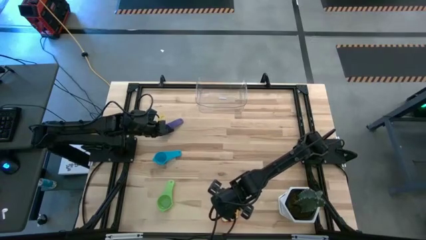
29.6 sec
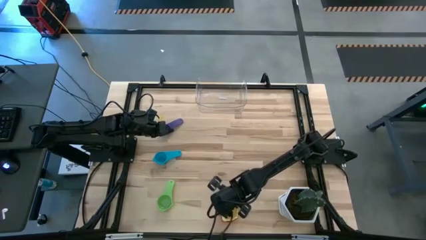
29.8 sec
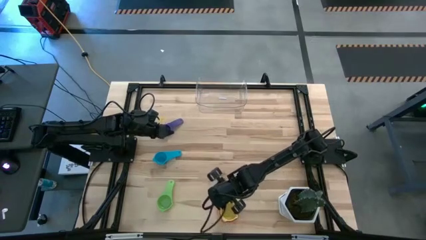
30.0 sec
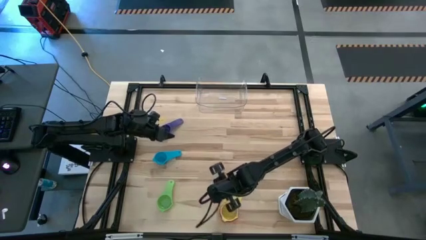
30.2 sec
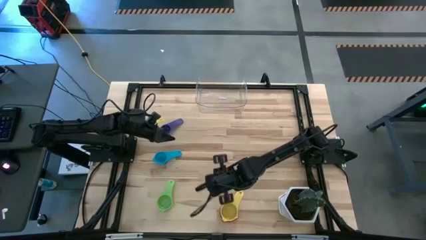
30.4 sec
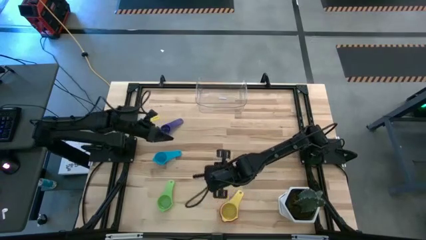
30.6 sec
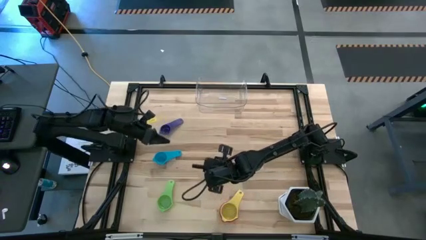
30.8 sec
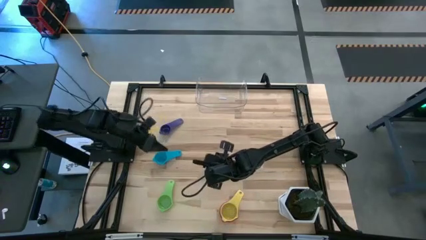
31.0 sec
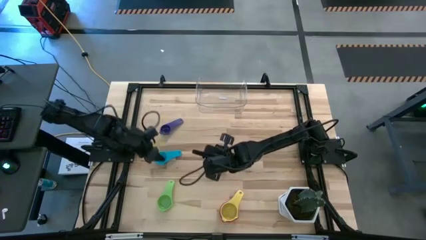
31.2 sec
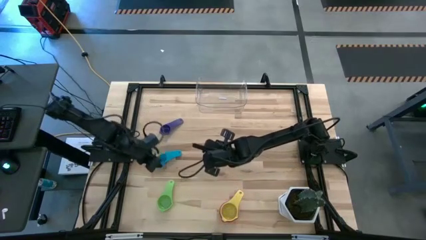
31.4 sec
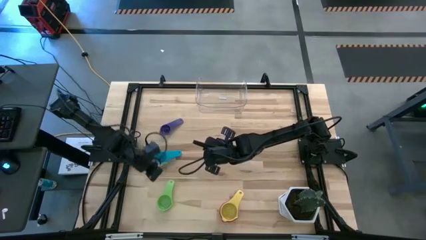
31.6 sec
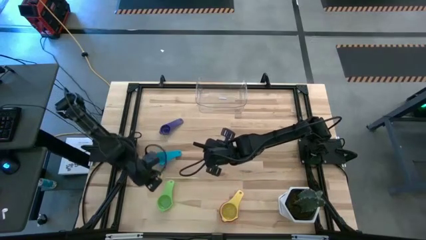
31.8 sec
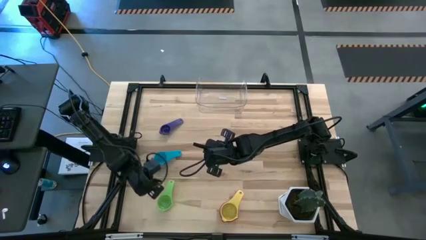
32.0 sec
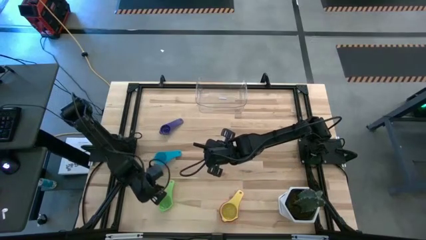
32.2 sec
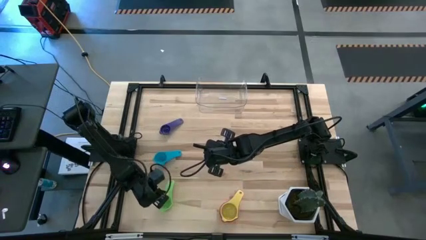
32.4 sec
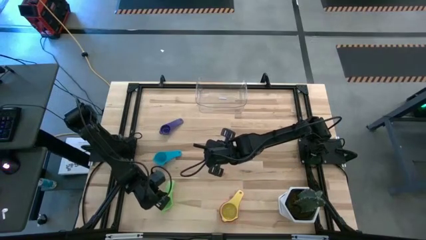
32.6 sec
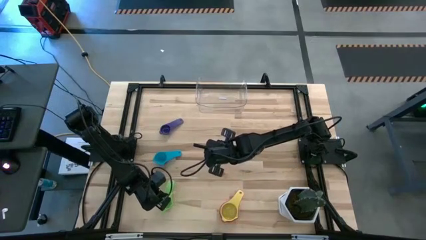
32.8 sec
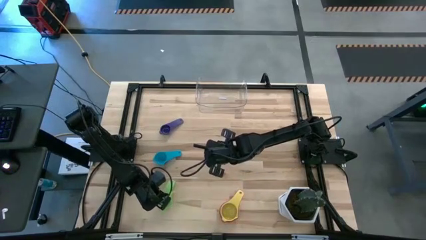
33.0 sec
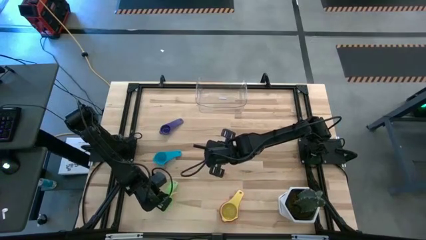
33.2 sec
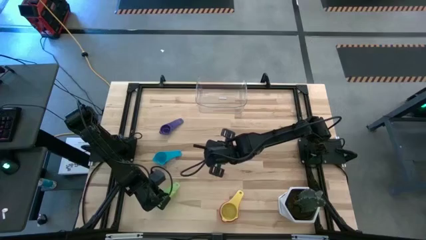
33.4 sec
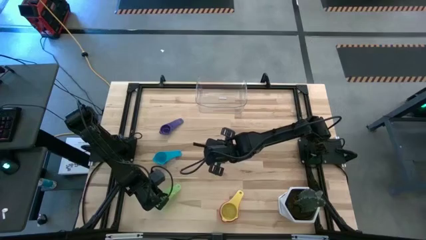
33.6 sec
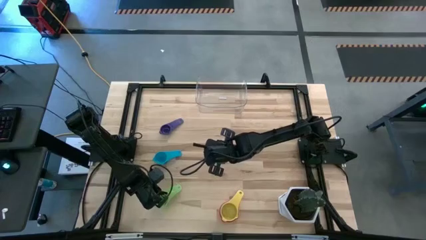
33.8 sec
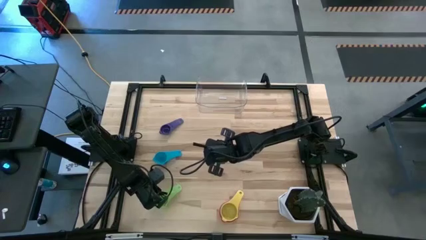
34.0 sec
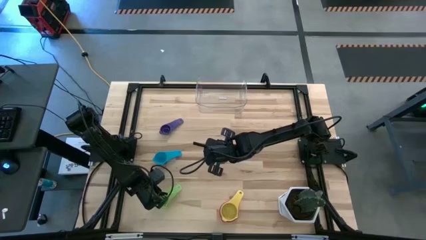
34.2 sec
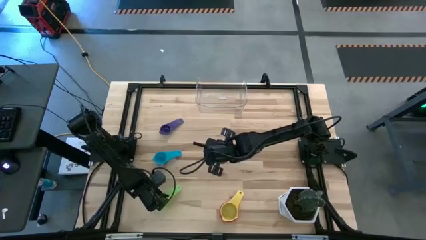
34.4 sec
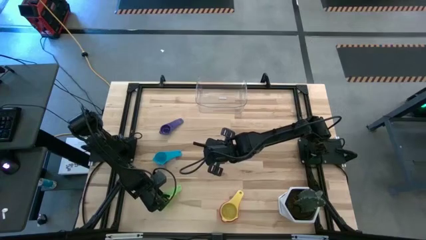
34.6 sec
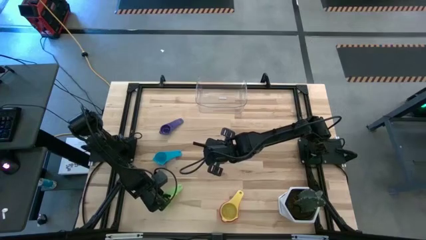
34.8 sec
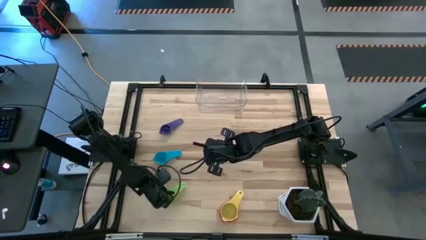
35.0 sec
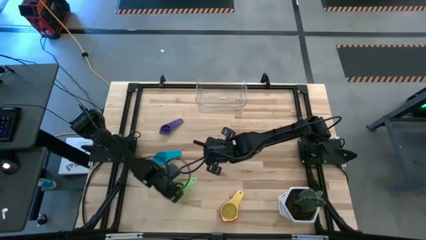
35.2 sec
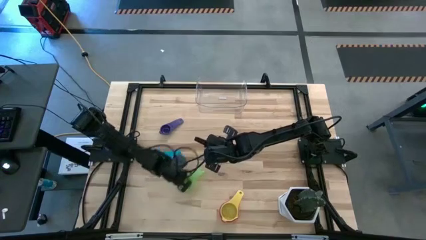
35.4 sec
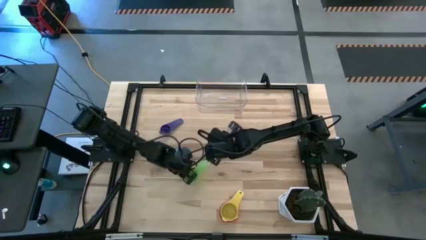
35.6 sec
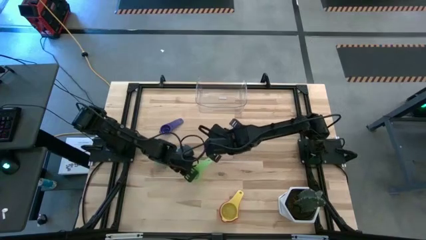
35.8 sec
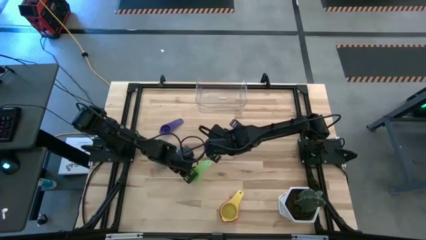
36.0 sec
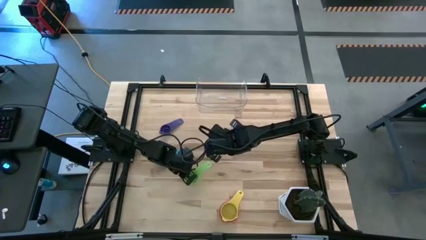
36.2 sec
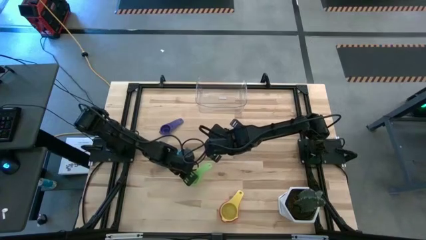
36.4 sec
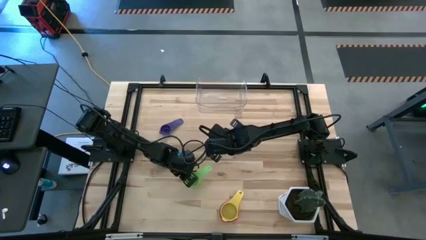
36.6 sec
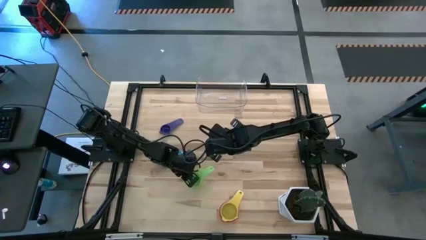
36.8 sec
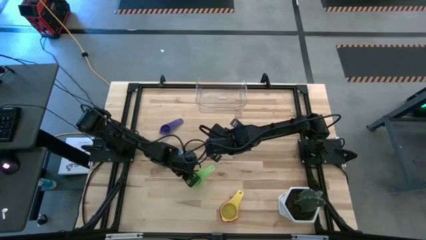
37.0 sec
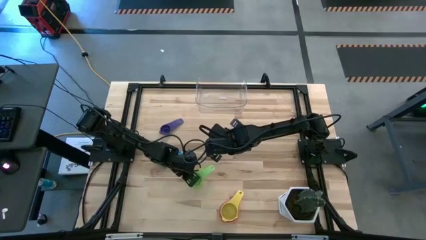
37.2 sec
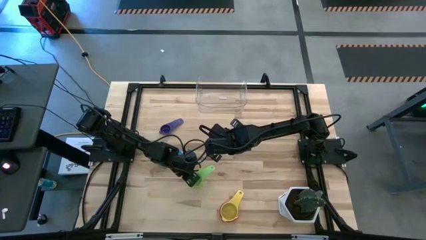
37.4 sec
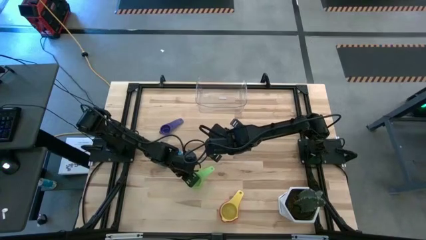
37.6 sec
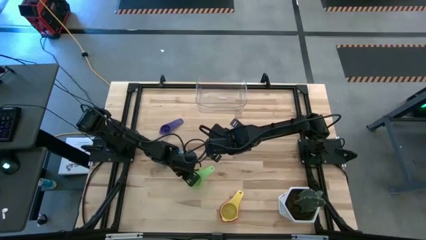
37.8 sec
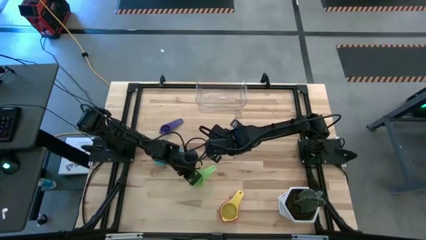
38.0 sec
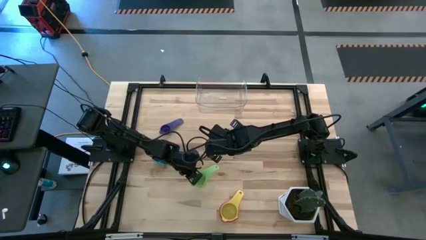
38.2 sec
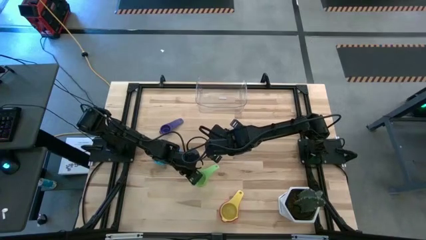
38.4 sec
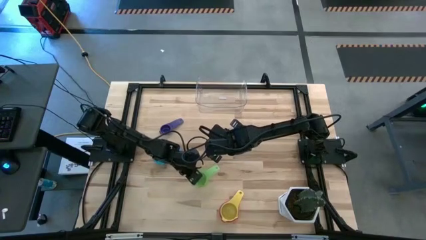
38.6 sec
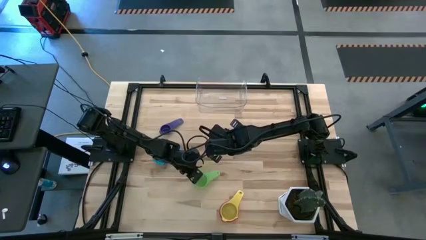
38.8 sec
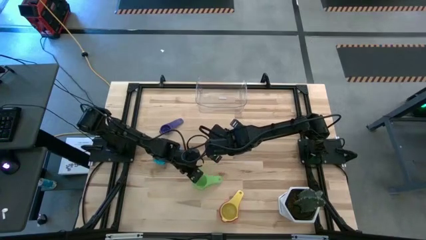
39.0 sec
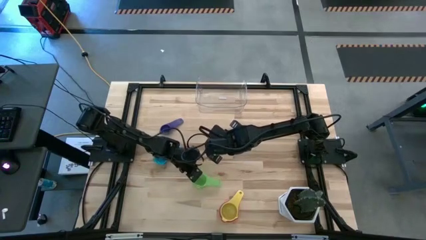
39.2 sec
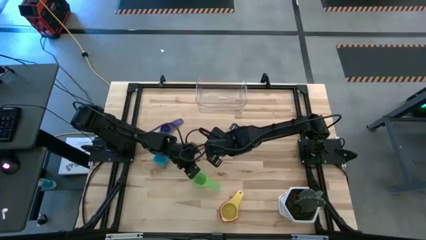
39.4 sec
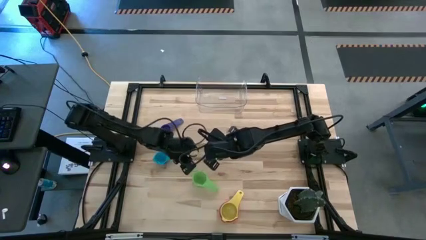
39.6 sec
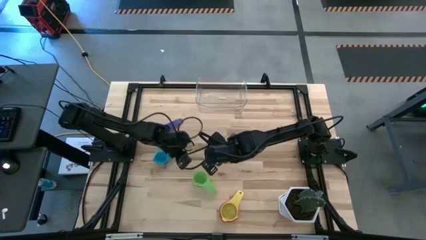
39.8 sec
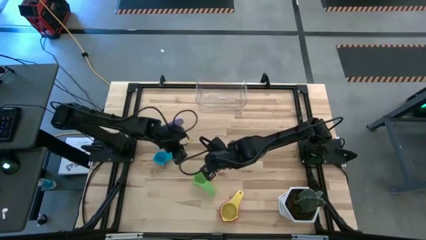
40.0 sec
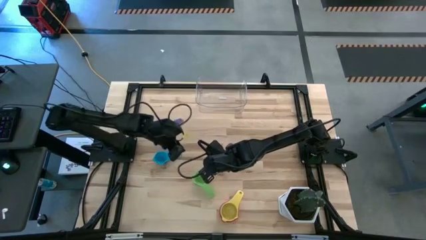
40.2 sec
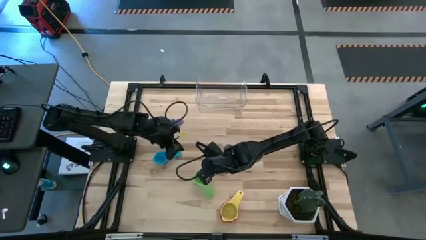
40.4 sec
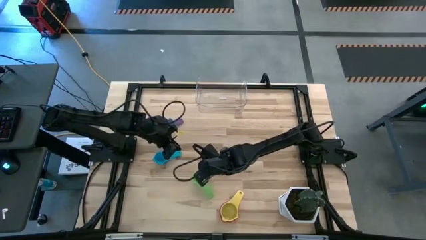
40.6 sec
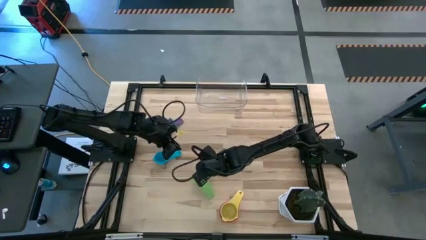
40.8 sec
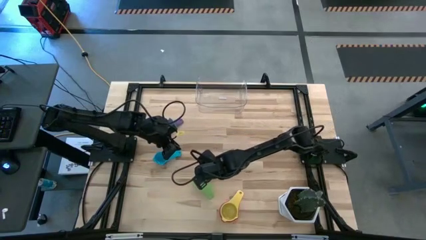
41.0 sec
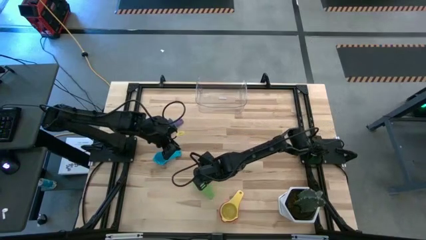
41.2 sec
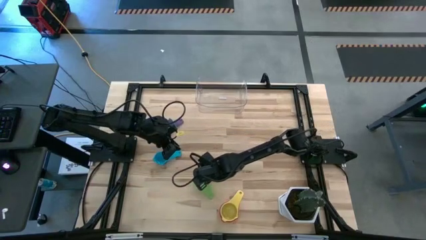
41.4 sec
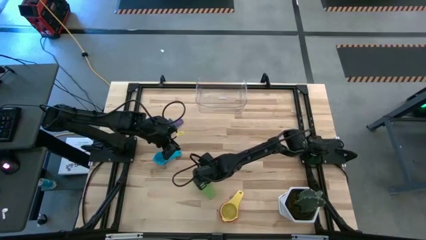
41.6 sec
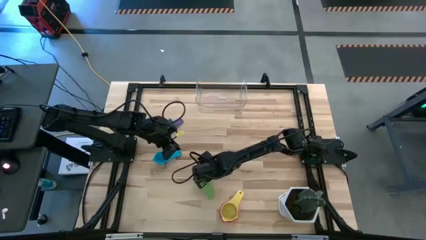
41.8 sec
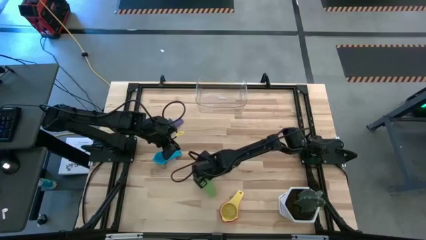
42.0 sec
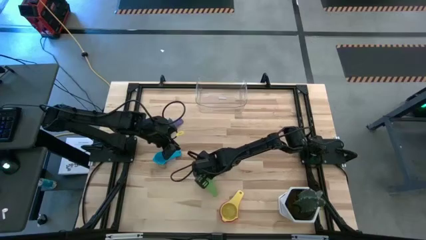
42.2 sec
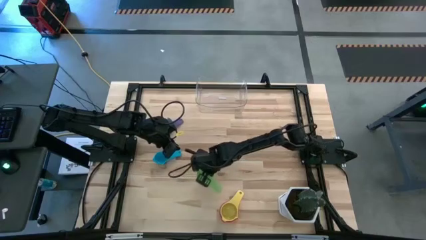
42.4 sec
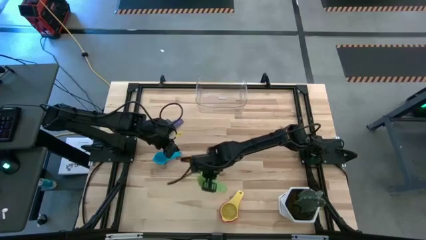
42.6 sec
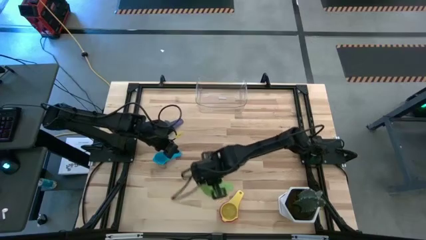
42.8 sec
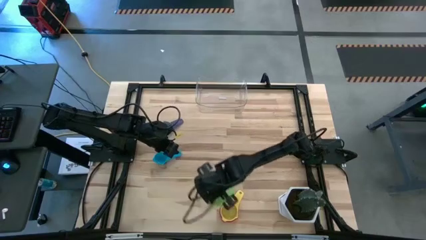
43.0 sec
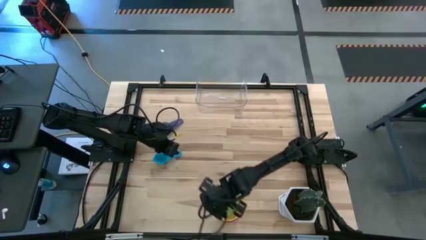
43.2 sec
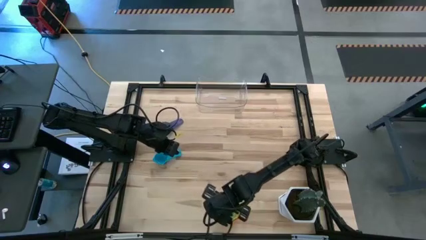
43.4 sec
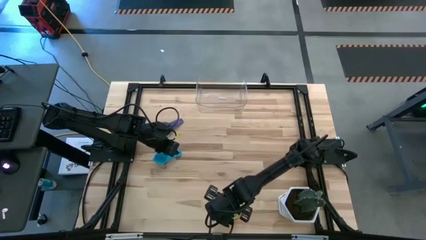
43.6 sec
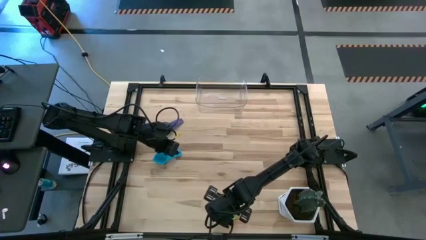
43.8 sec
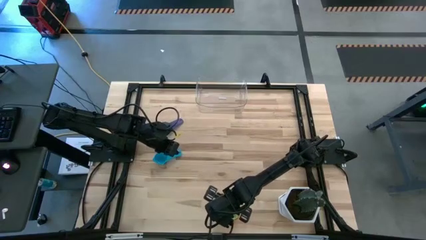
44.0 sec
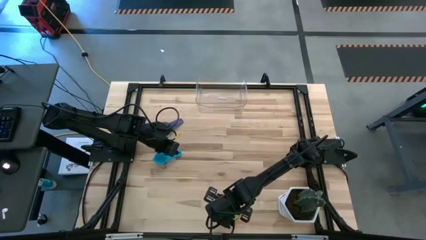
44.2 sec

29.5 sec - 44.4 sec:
Task: Nest measuring cups in basket
Stack the green measuring cup on the yellow measuring cup
